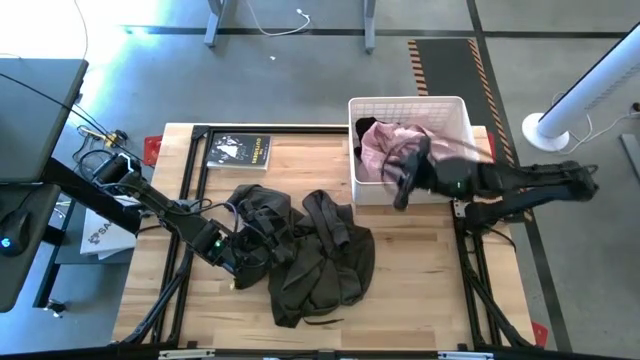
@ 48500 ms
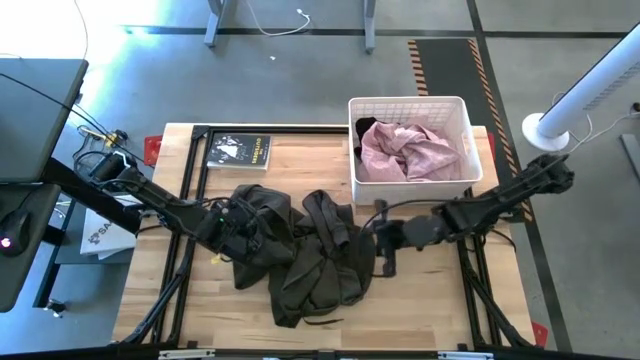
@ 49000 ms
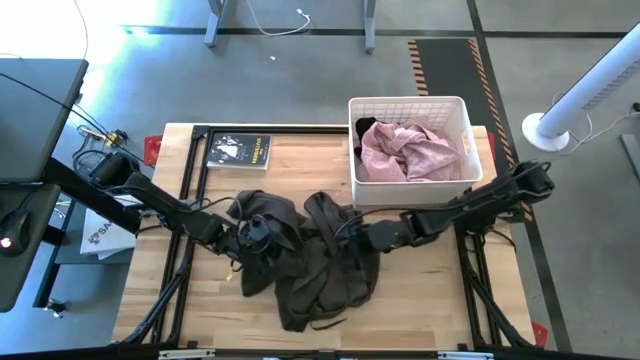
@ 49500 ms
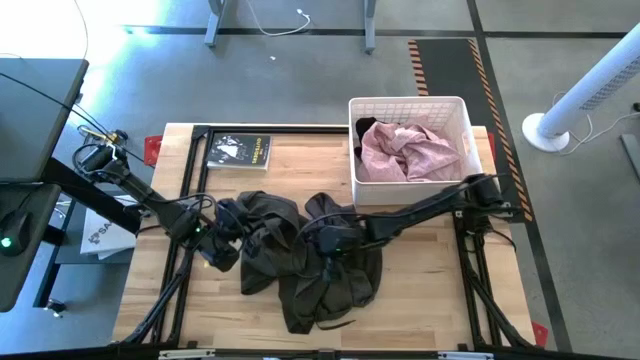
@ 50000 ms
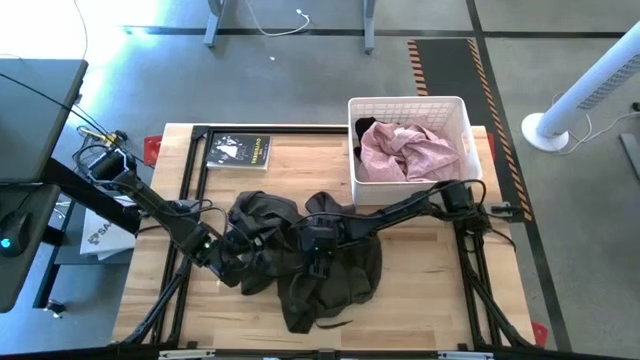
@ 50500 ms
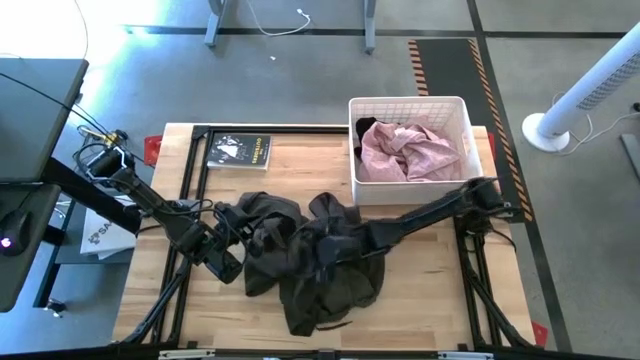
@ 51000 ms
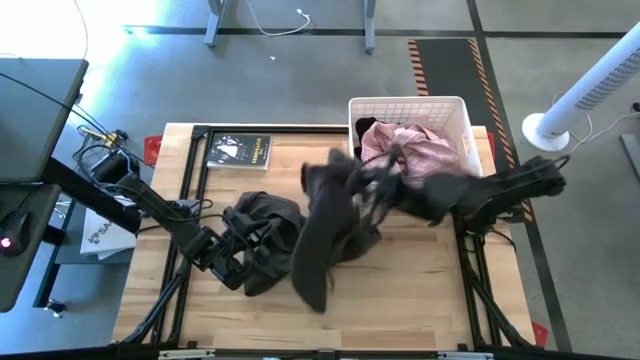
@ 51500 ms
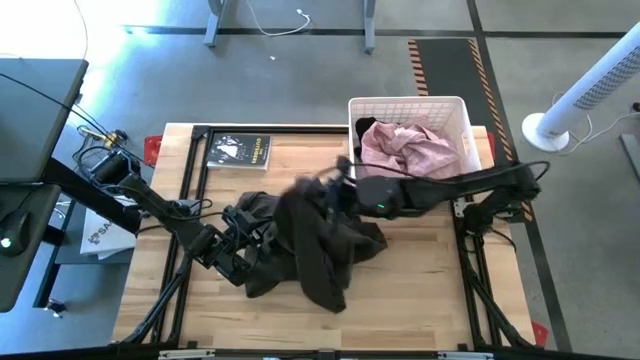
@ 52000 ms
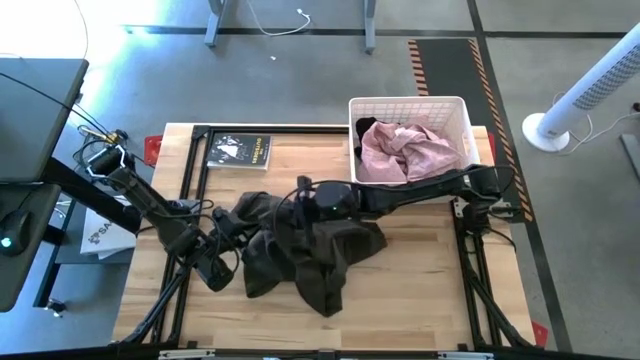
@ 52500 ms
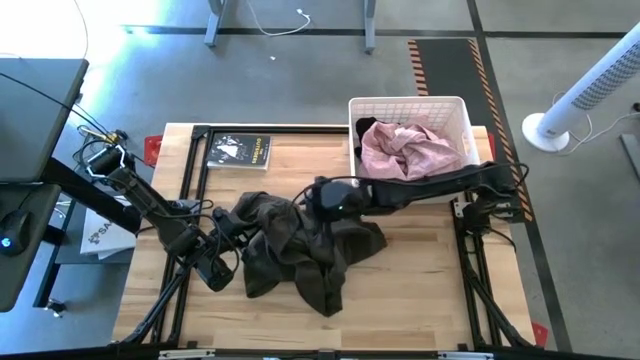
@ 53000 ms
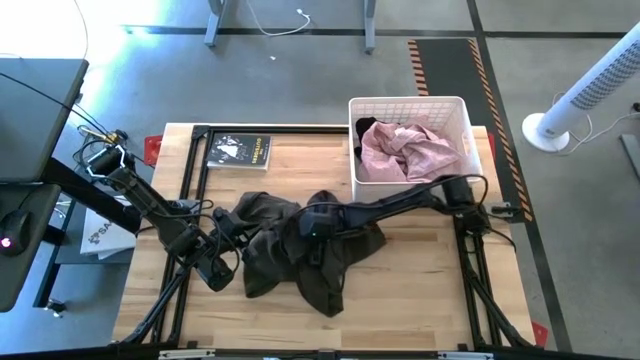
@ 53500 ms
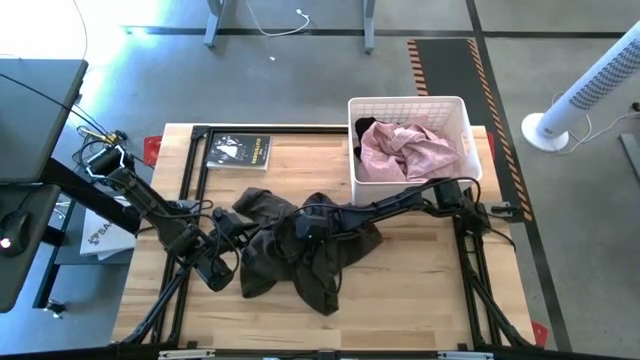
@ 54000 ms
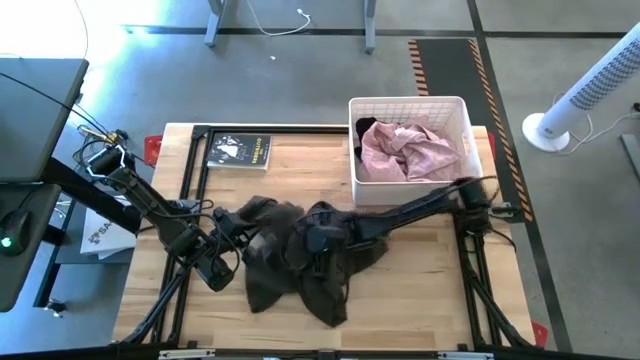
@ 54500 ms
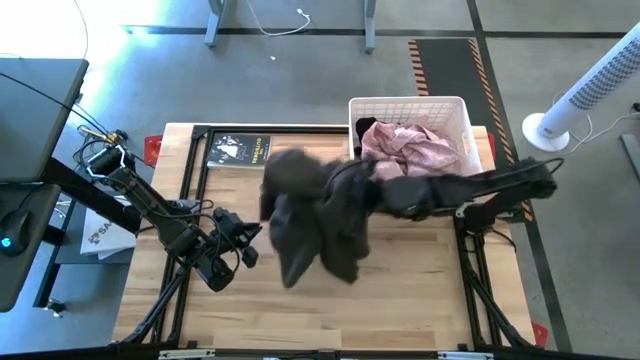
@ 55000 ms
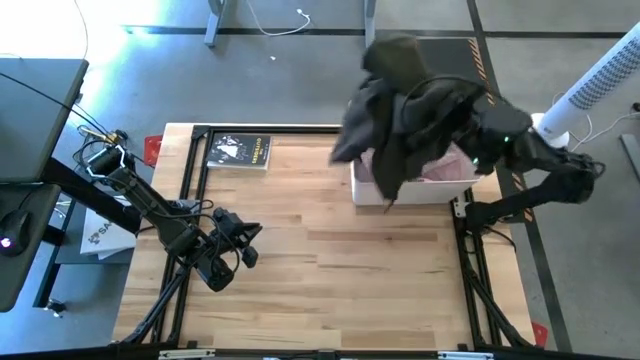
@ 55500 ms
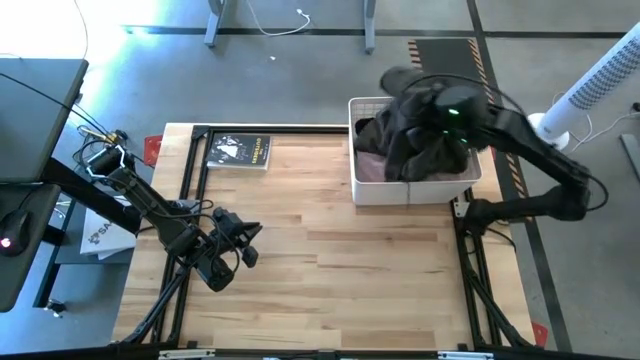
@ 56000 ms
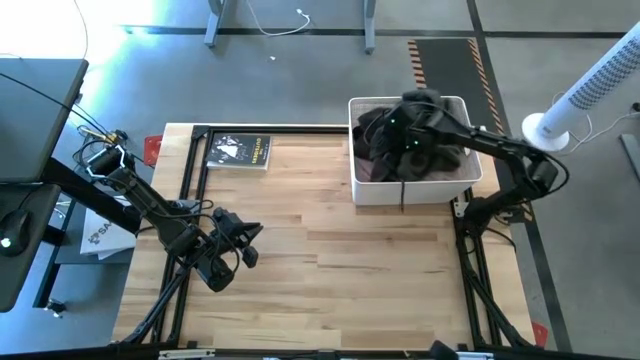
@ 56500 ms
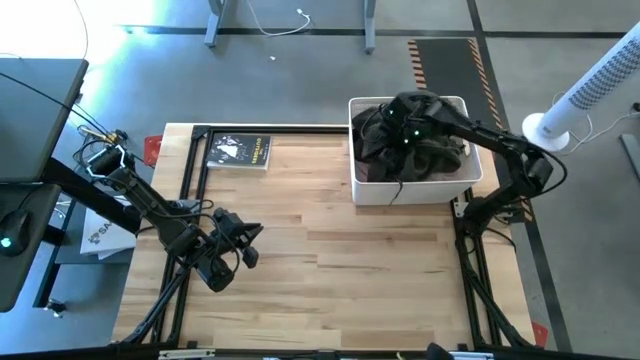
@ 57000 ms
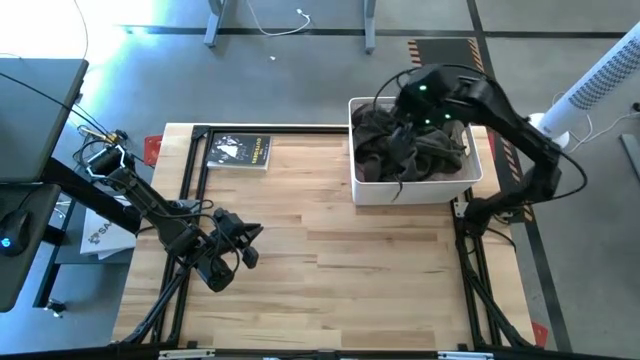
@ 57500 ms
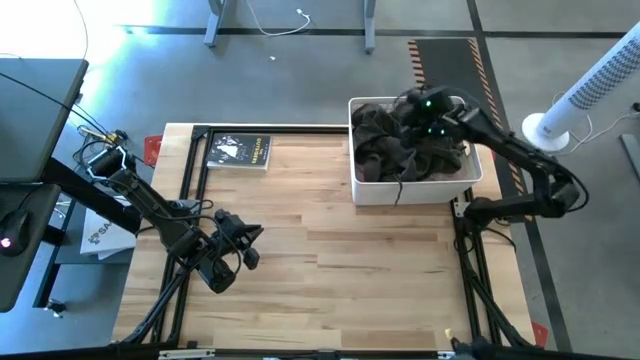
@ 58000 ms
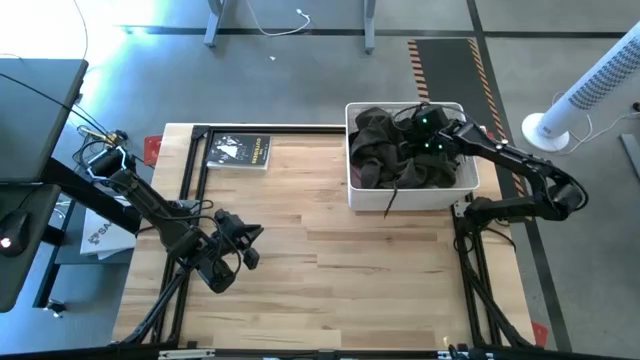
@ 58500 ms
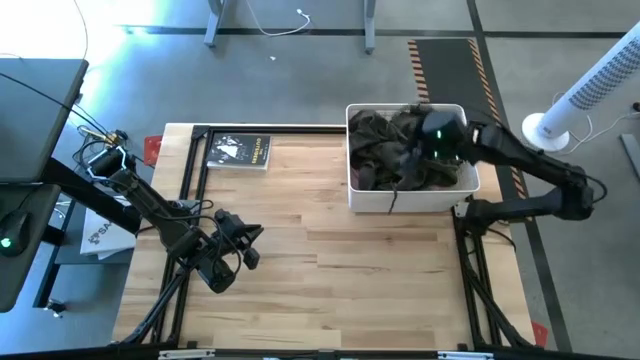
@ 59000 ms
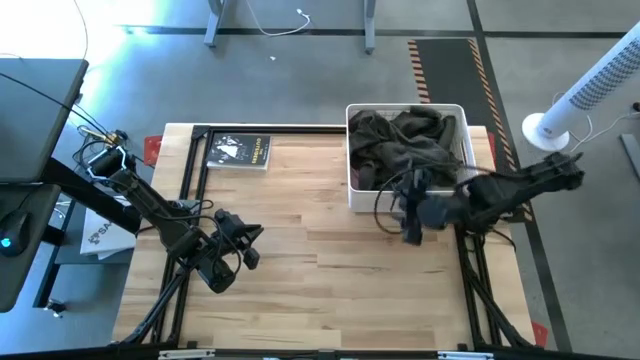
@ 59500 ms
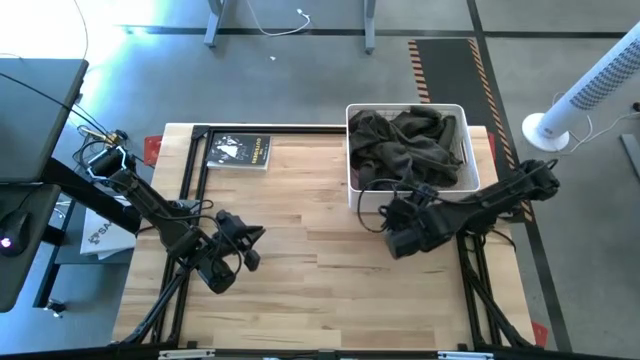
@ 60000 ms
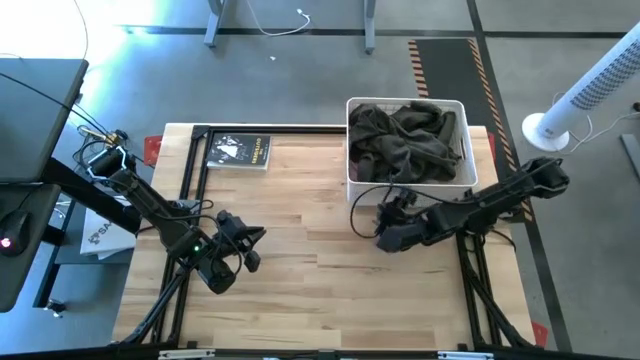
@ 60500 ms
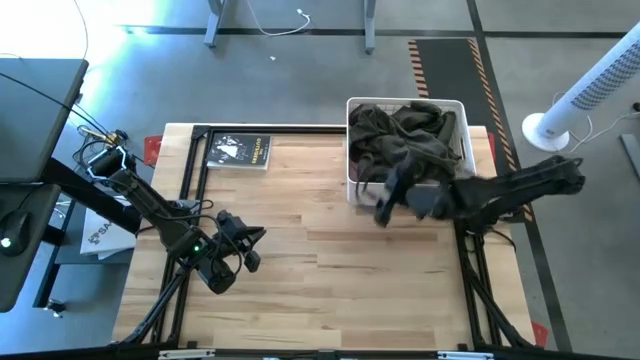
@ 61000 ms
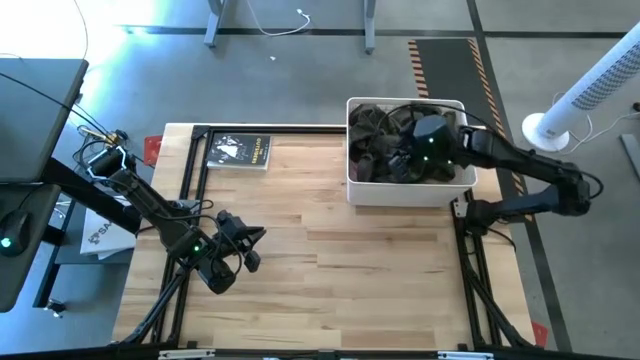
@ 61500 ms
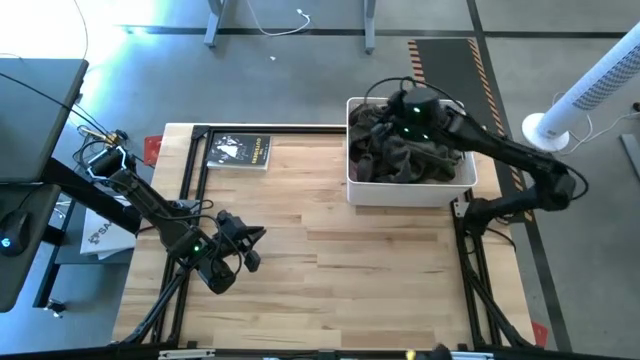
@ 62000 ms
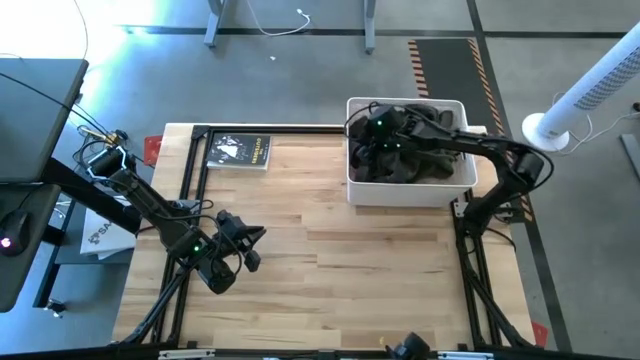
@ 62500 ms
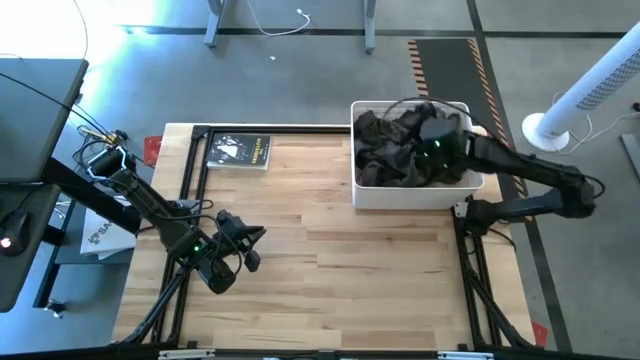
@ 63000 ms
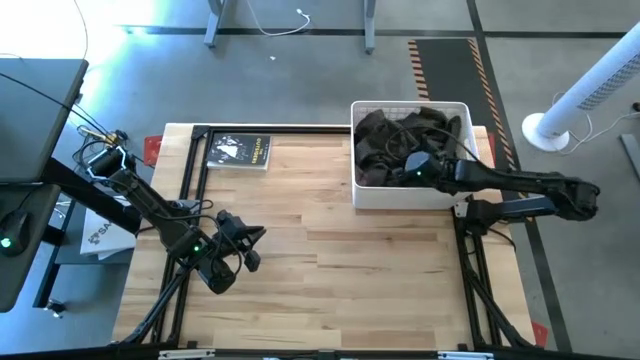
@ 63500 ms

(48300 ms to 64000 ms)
Task: Sort clothes
Put the black jacket into the white bin

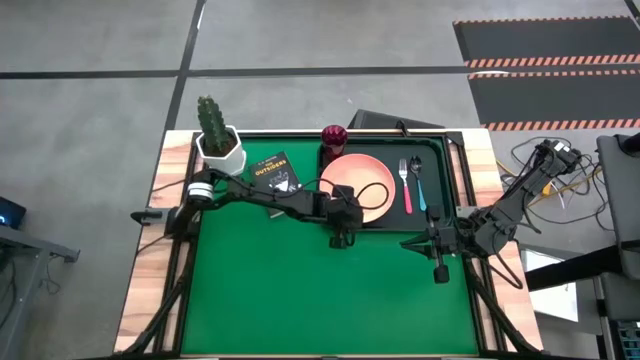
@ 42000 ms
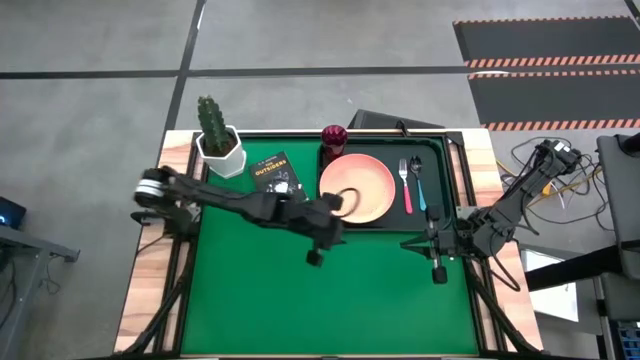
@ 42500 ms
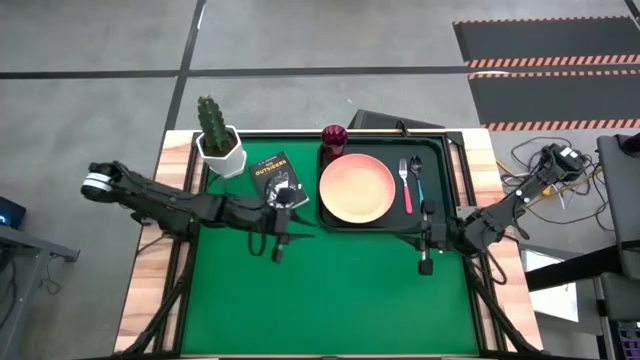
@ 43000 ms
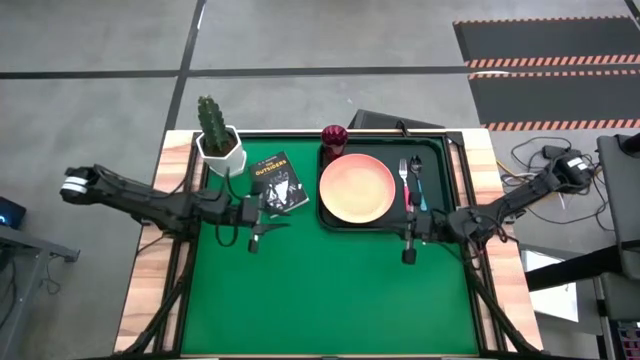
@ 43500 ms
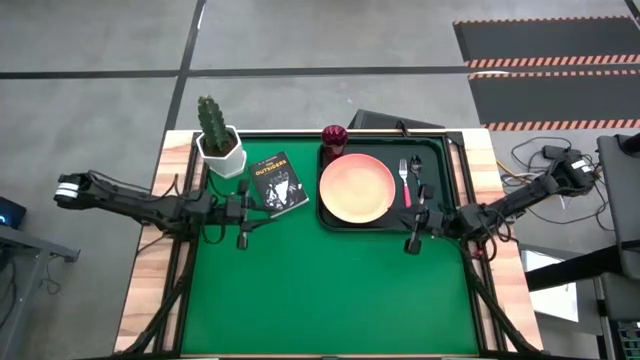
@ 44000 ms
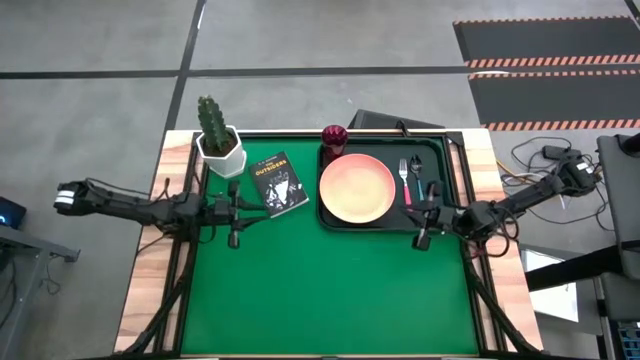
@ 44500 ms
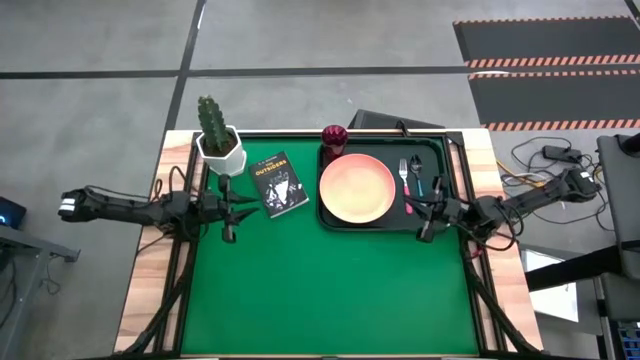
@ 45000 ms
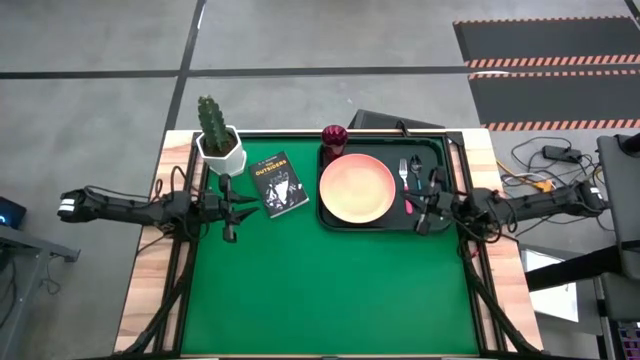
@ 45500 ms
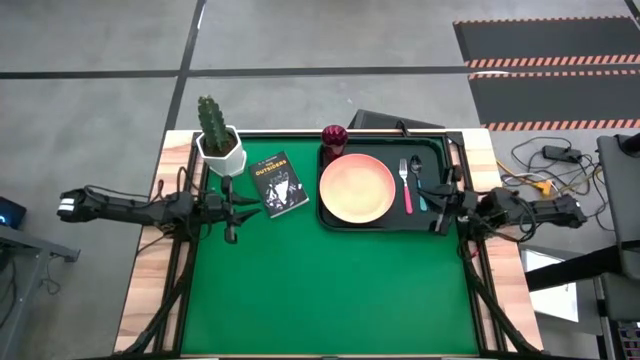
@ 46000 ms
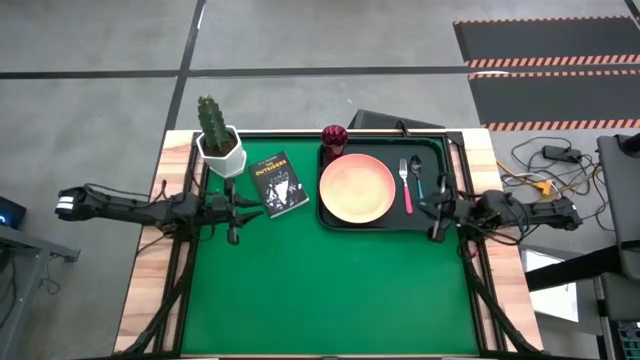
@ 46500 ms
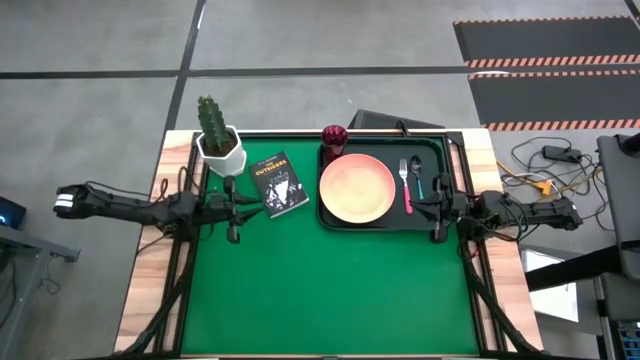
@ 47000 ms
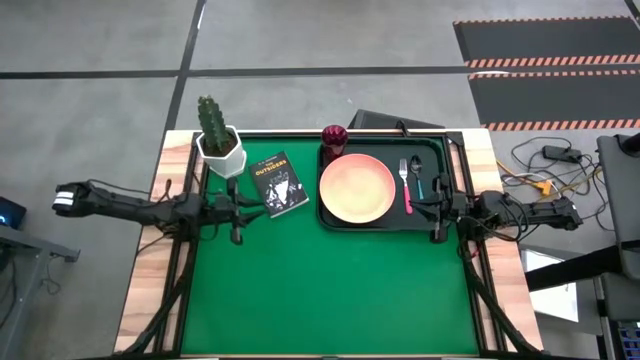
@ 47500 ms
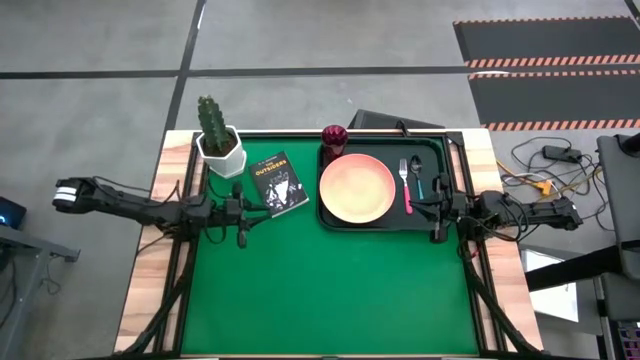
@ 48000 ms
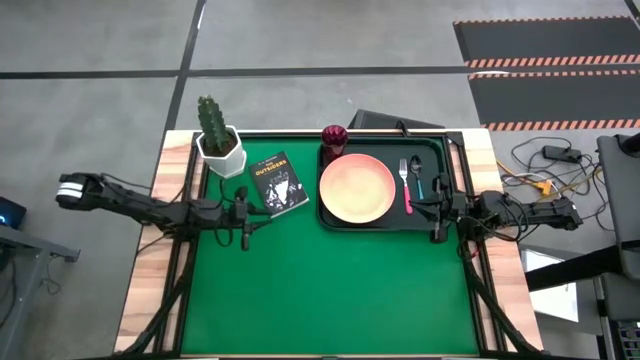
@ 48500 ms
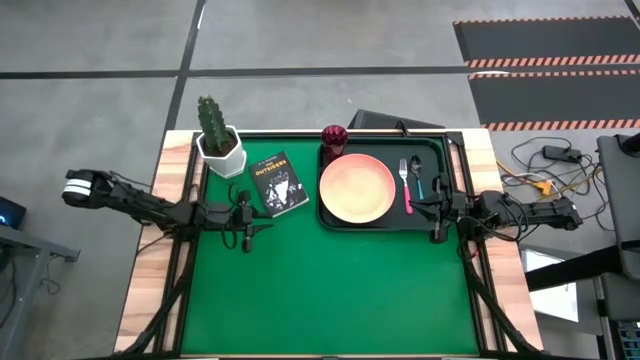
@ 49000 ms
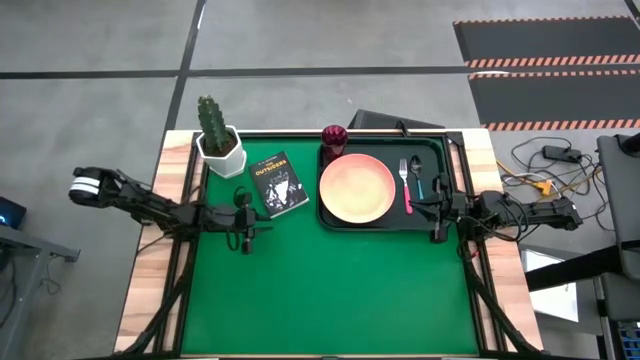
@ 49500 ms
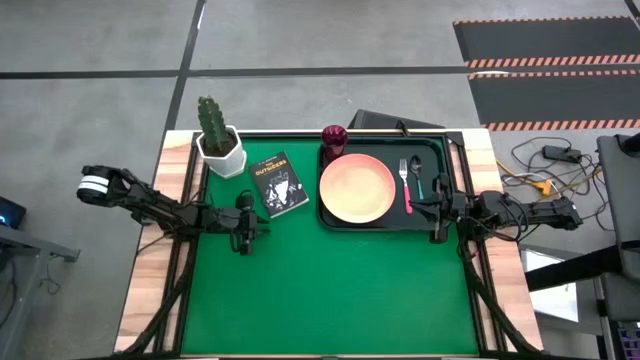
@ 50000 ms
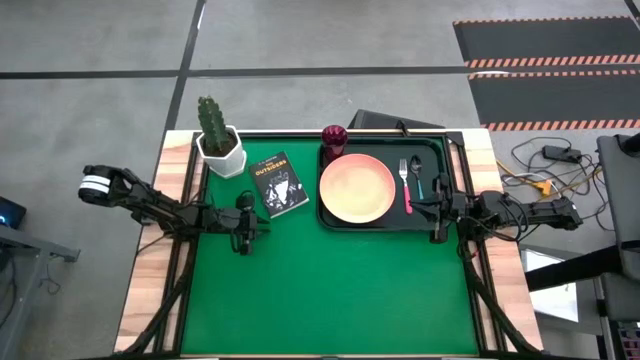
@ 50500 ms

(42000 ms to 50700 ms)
Task: Pick and place plate/cup/fork/spoon on tray
Return to Home Position
